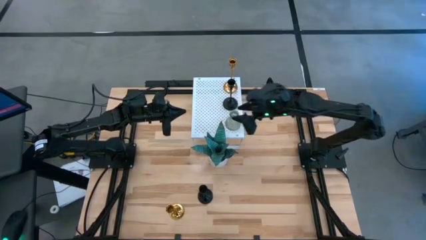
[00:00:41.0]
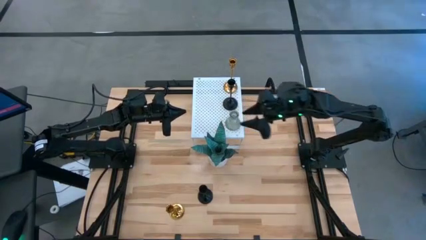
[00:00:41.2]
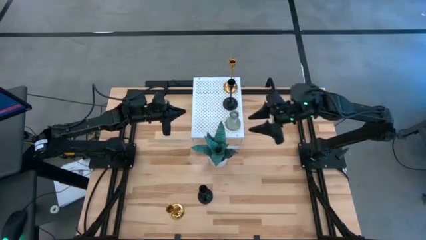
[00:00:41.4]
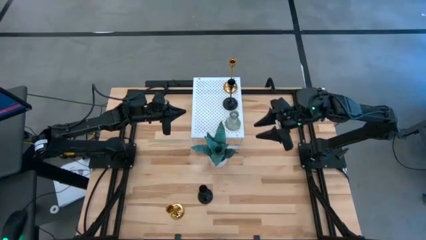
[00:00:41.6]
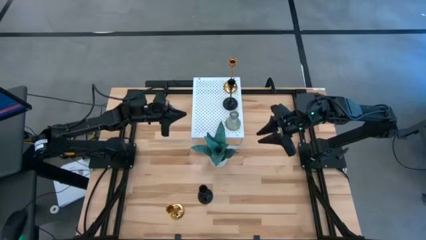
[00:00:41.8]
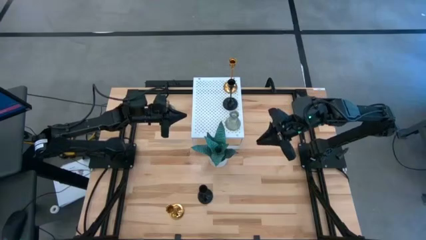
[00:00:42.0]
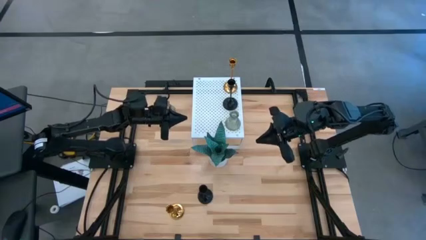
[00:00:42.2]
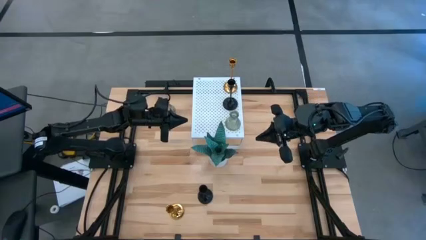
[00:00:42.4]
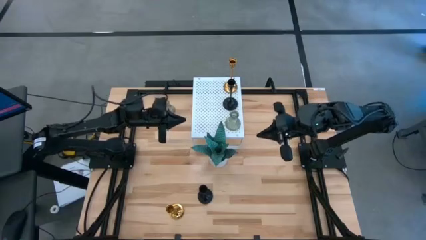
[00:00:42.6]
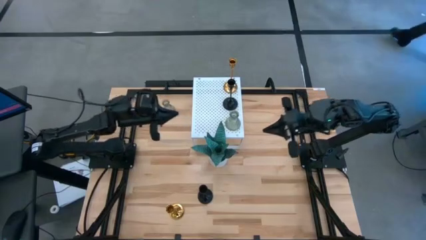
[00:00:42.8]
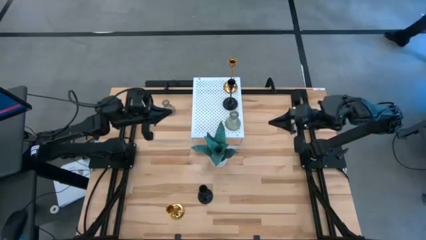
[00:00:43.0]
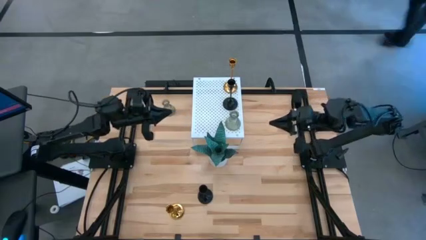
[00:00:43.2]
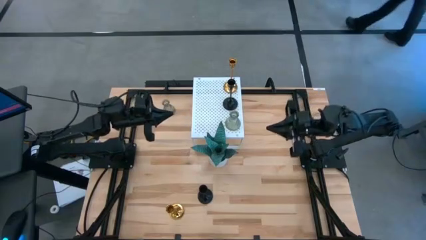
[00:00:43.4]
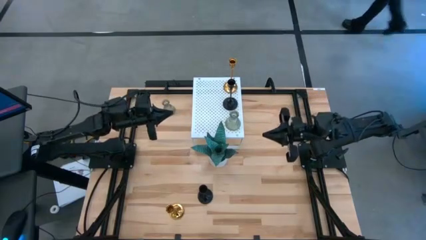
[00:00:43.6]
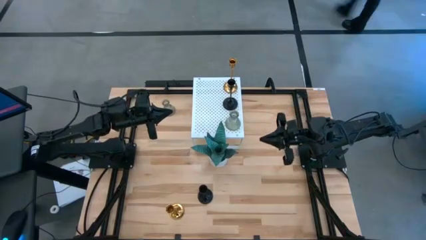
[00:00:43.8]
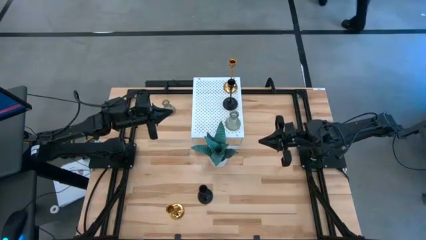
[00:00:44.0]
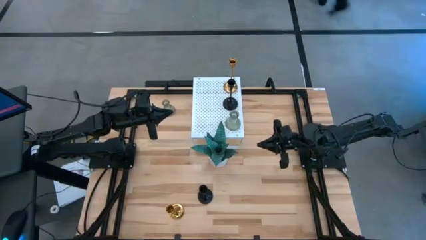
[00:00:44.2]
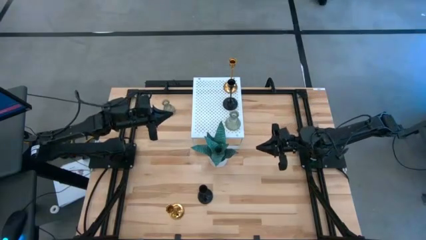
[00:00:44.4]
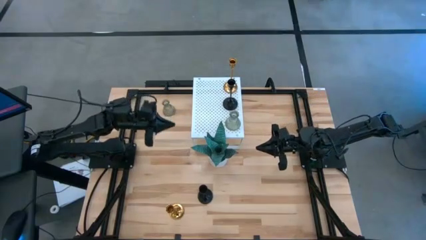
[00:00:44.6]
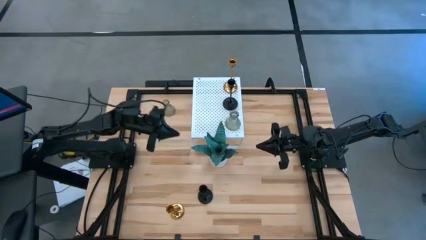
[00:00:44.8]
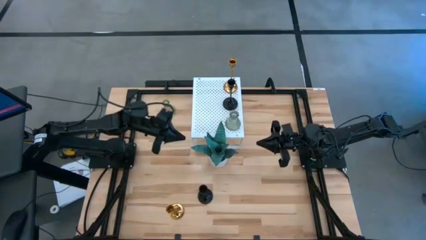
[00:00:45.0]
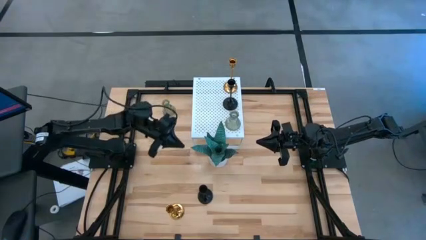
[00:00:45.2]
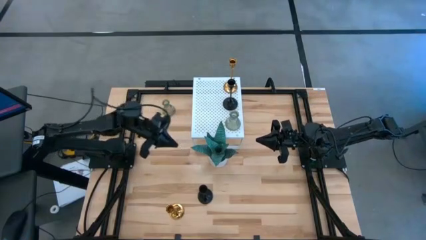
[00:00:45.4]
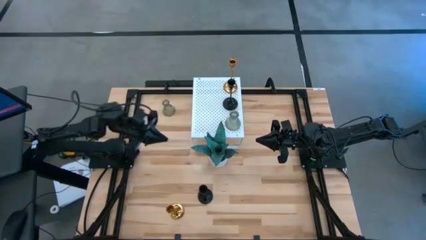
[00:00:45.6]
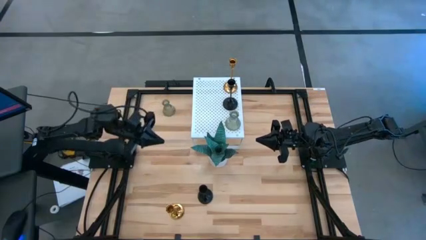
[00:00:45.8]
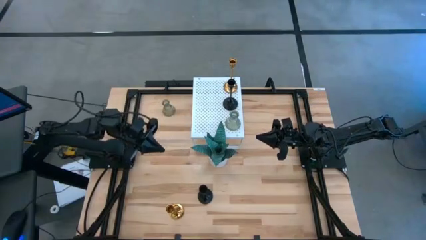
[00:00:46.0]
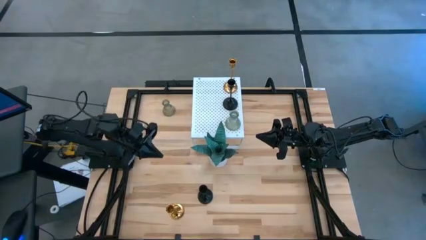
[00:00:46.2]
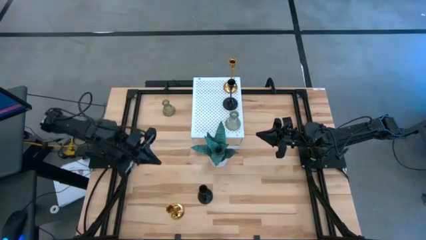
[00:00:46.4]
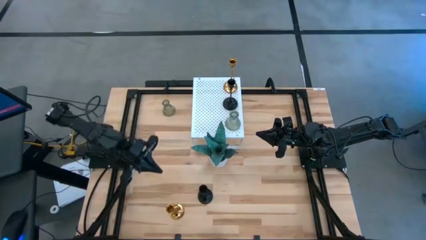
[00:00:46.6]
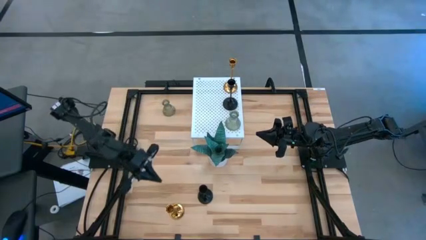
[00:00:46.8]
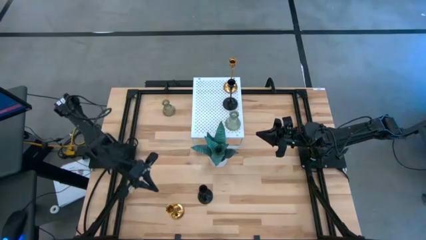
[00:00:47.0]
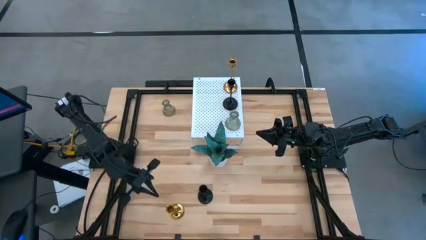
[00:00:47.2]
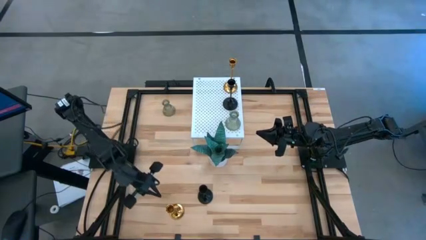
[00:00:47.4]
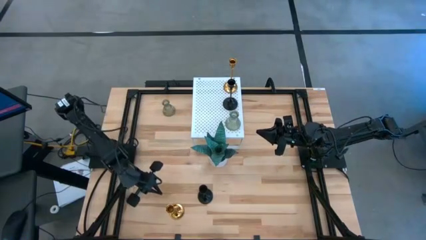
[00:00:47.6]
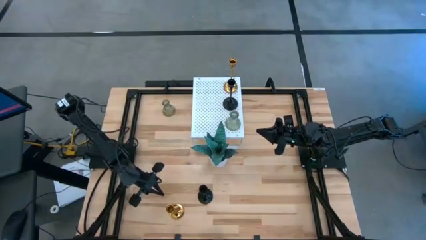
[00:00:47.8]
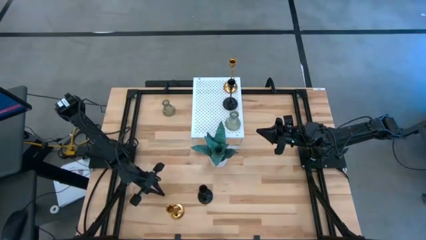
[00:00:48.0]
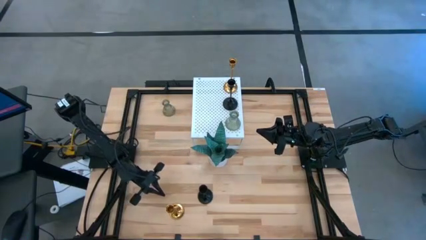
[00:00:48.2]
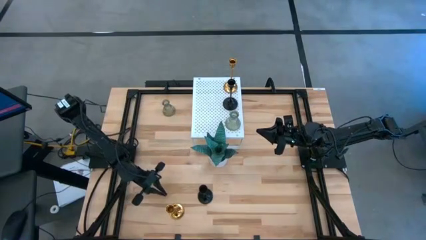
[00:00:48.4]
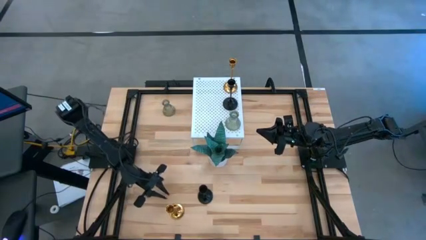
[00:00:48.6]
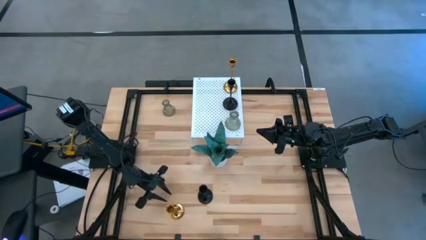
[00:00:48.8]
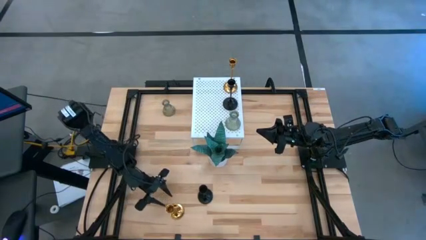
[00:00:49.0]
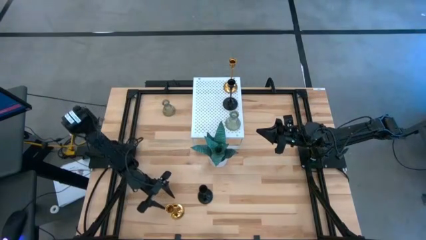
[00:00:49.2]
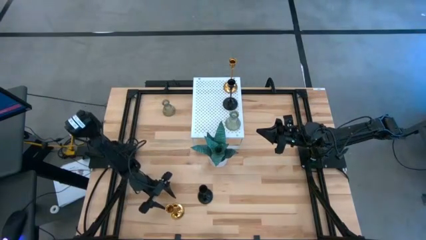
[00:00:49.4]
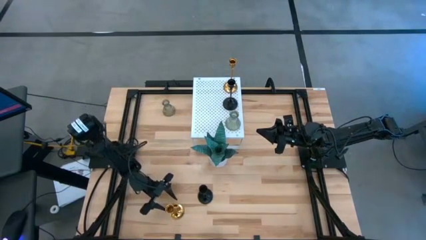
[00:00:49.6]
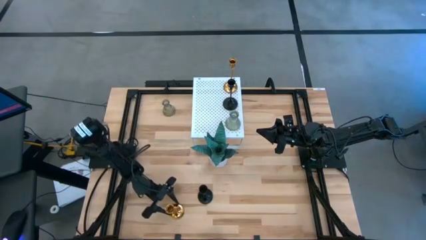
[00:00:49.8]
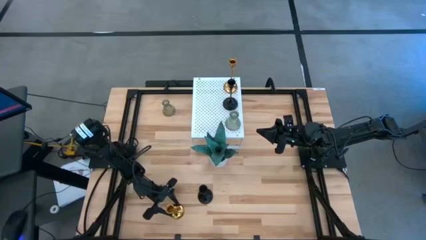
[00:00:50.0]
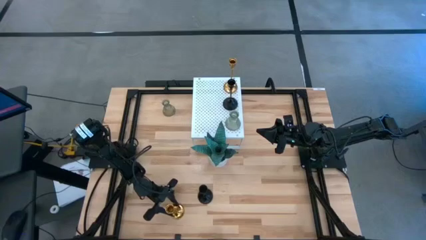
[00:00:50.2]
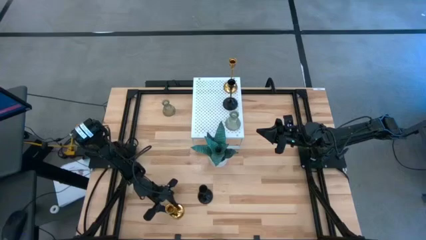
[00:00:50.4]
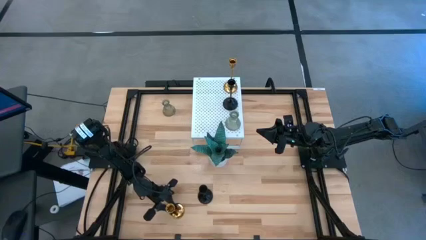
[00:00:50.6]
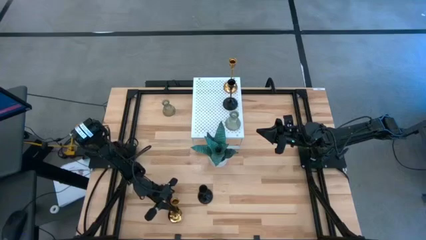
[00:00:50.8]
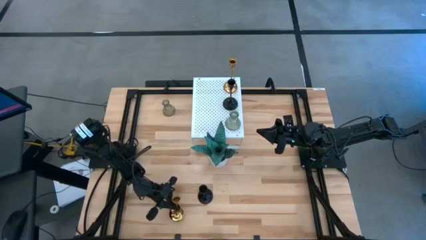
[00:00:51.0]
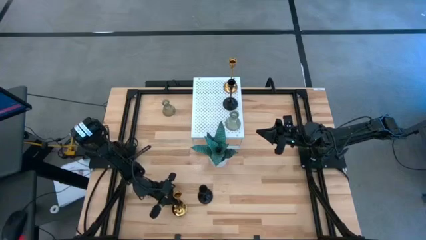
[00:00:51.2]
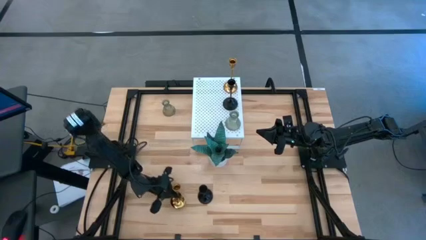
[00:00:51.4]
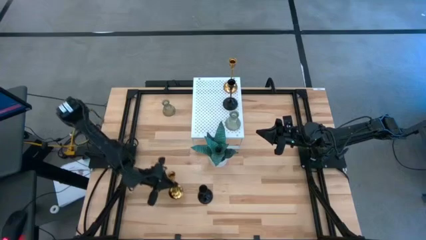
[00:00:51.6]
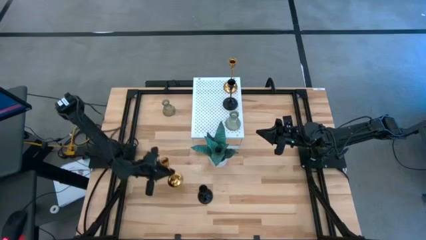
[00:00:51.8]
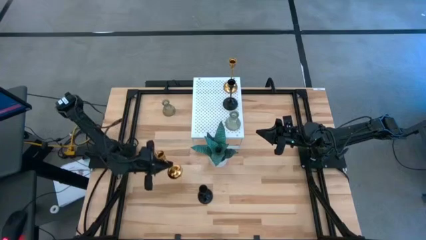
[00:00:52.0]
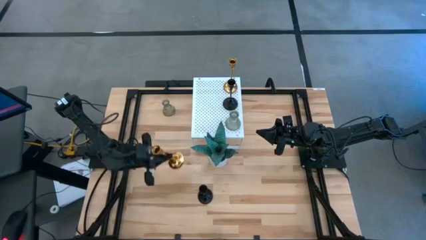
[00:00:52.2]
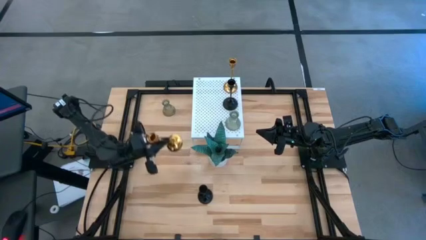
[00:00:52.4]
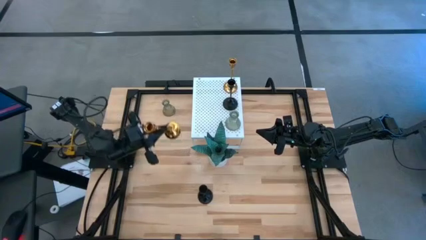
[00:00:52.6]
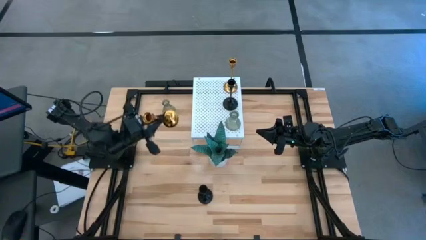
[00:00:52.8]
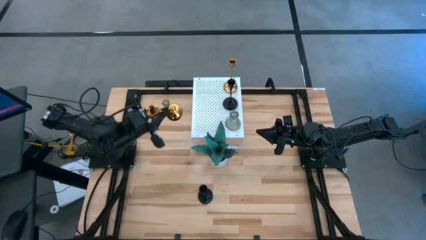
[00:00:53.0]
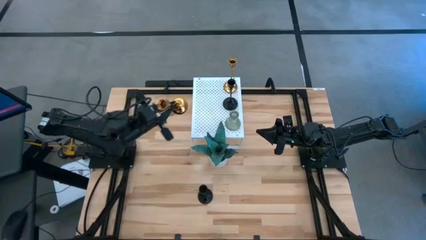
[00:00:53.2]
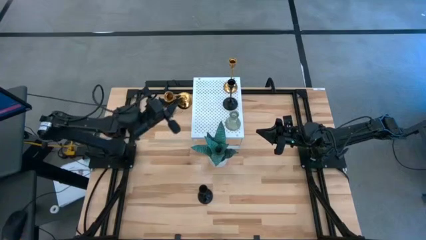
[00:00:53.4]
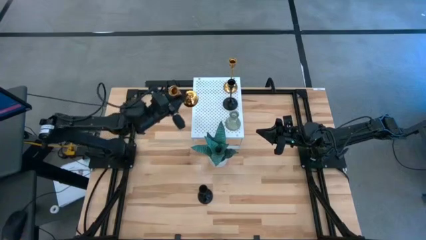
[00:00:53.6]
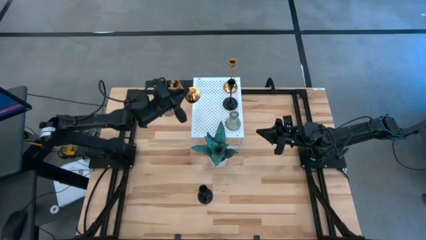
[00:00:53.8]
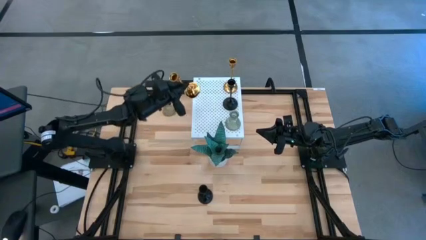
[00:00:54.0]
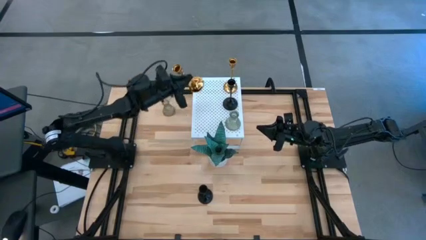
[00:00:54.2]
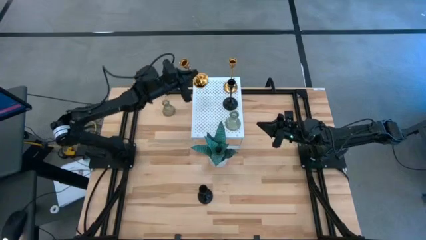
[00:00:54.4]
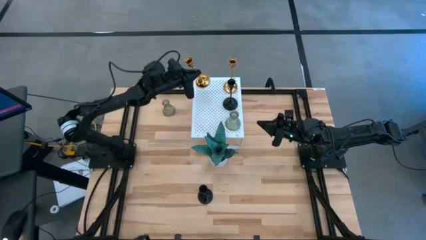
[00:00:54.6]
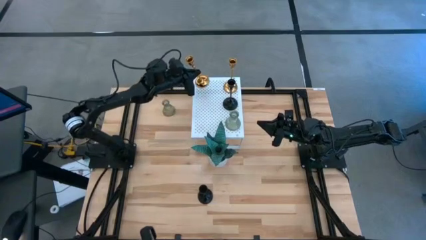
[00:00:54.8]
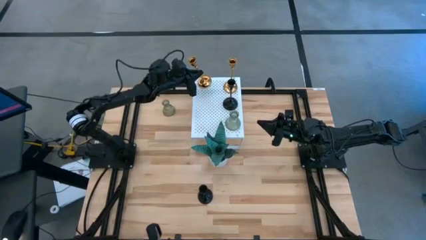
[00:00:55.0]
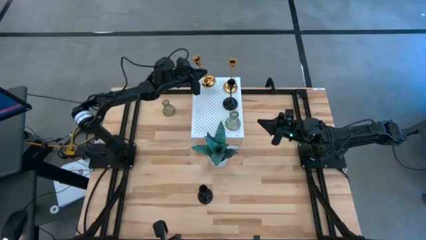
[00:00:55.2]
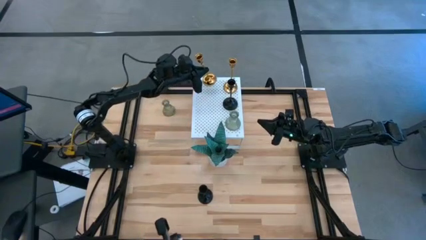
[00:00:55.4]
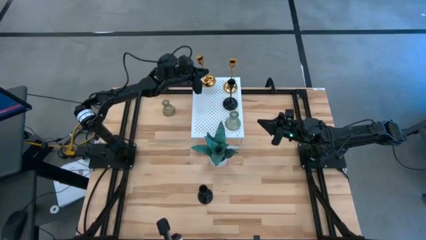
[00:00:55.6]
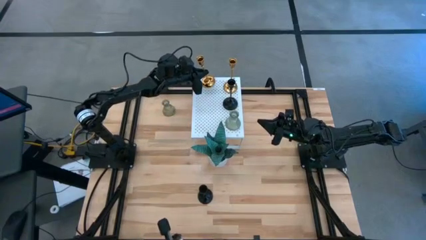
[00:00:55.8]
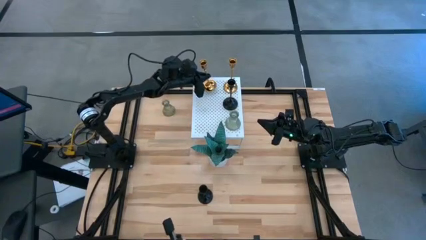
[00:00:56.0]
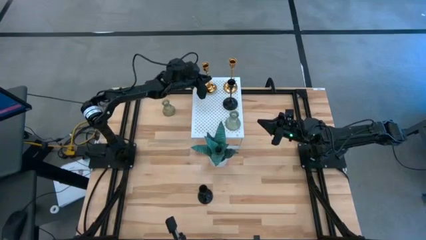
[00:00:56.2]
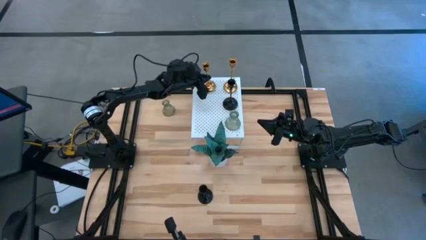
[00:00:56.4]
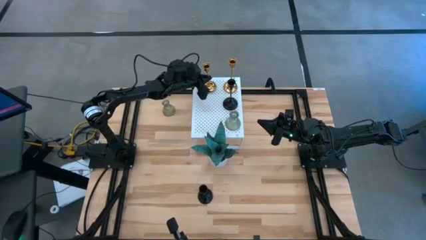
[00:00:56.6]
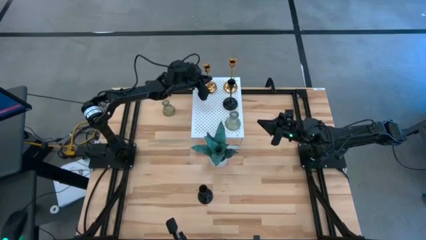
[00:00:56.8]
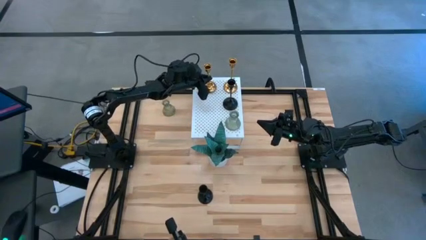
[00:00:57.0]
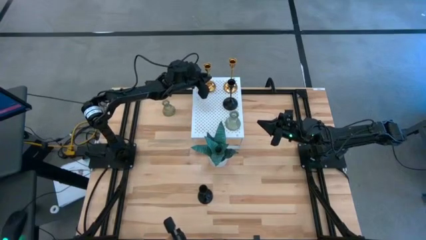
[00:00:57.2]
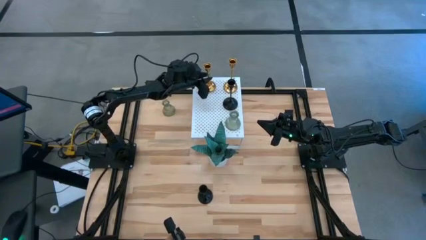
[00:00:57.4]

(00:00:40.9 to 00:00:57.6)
Task: Pick & Place candle stick holders
Put the gold candle holder on the shelf aligned with the other gold candle holder
